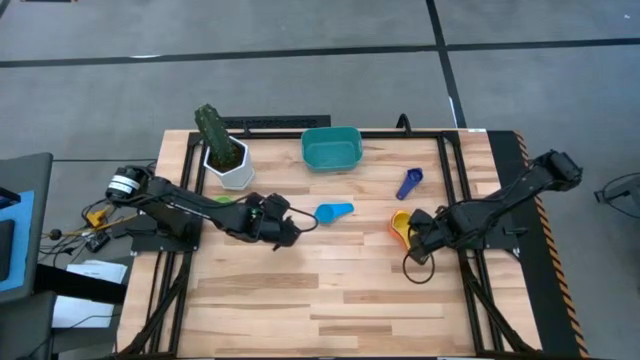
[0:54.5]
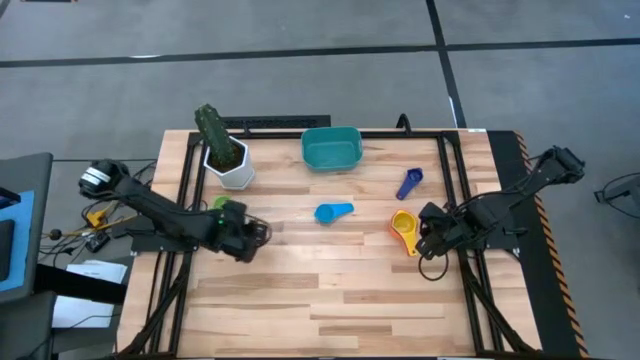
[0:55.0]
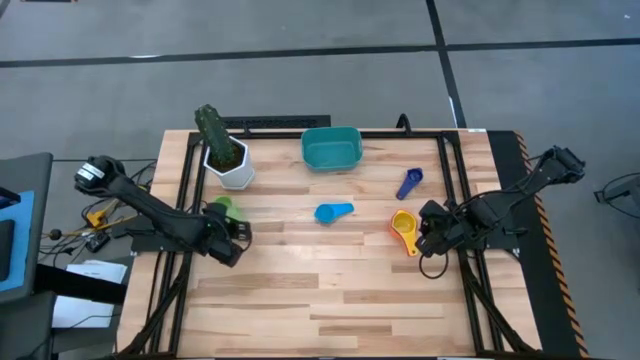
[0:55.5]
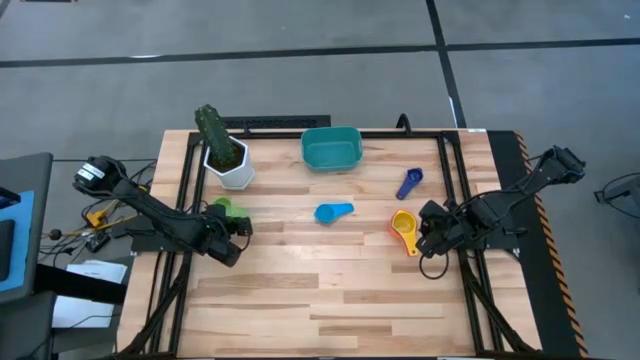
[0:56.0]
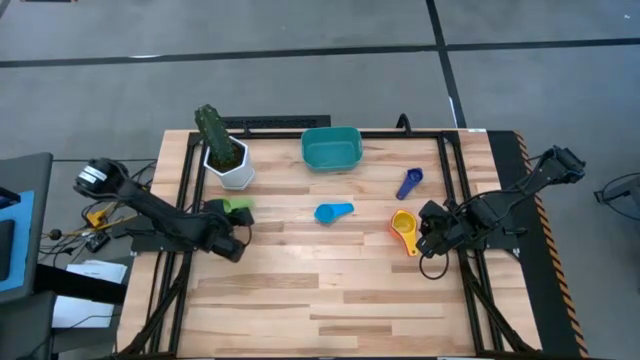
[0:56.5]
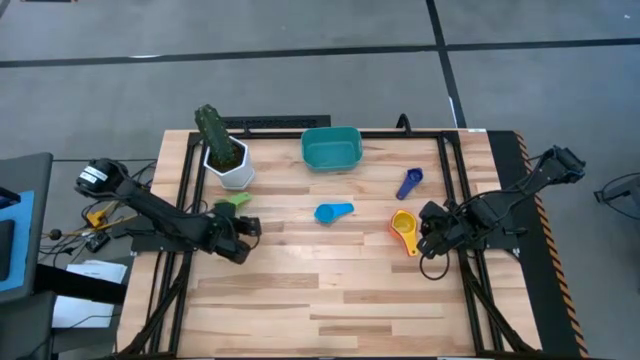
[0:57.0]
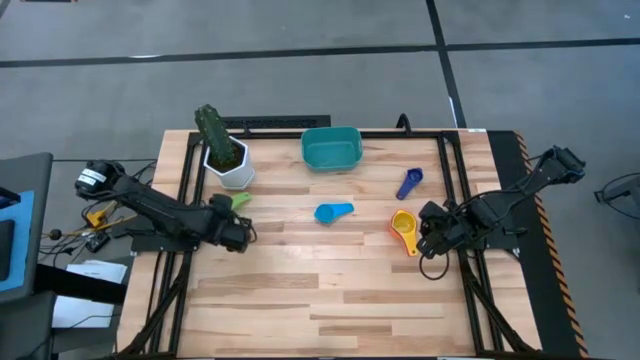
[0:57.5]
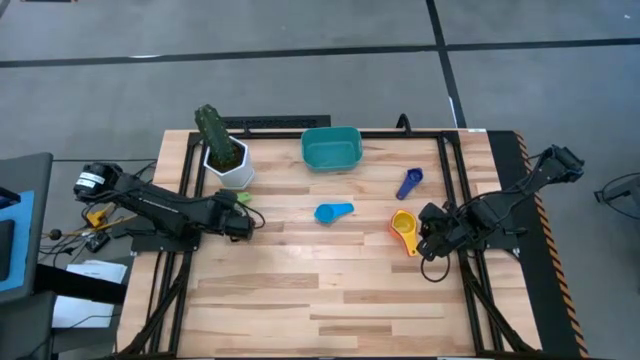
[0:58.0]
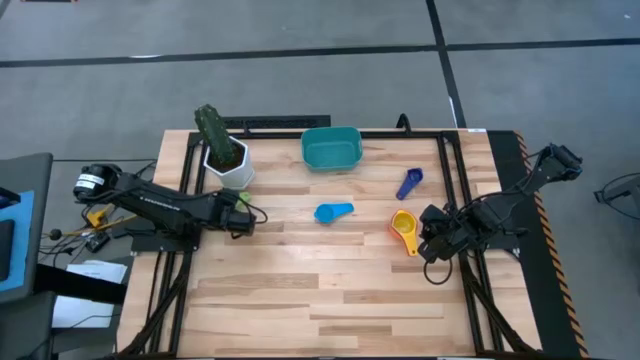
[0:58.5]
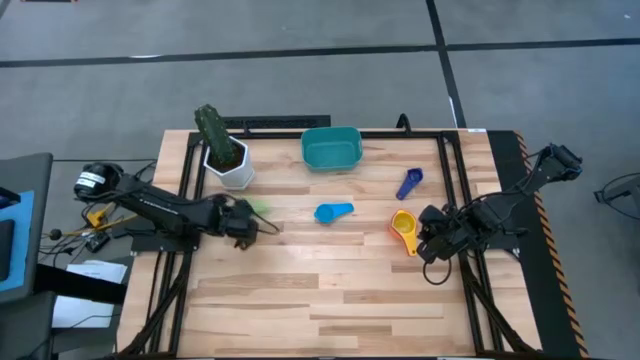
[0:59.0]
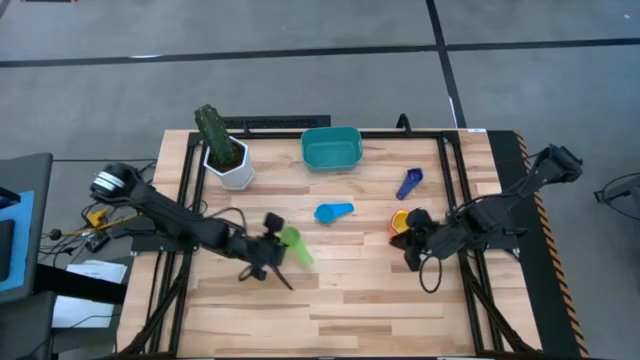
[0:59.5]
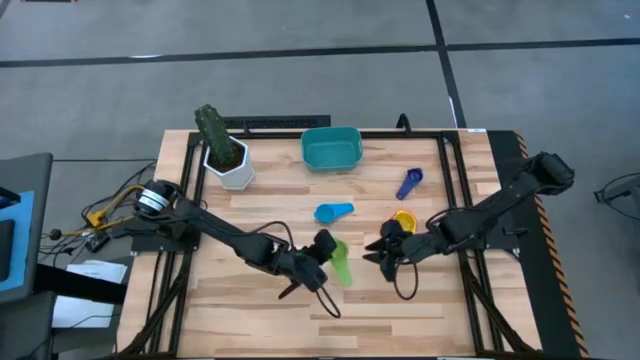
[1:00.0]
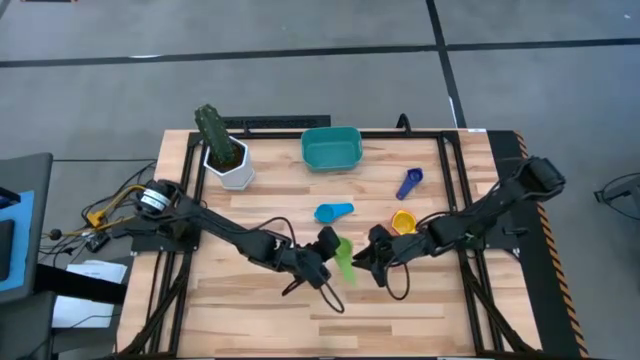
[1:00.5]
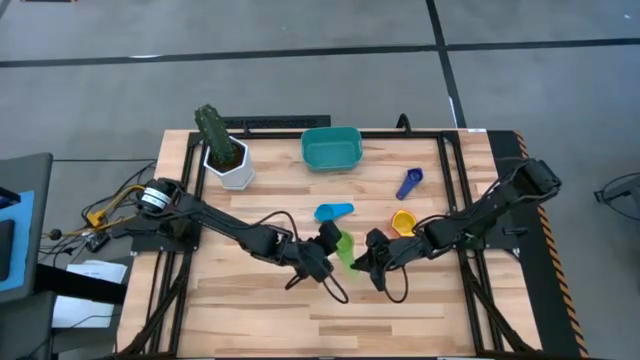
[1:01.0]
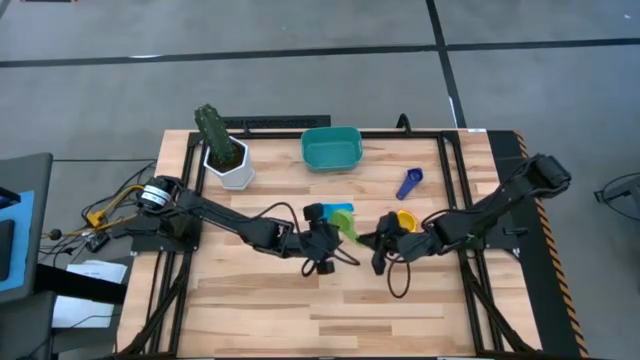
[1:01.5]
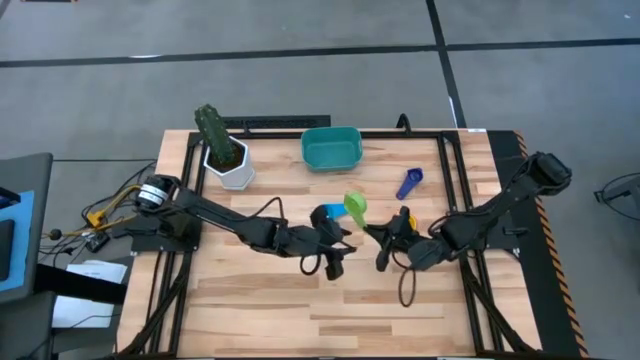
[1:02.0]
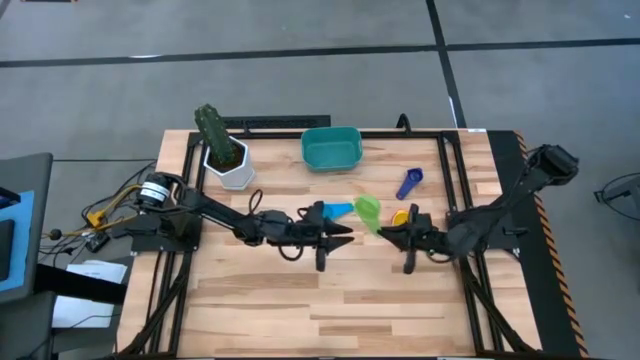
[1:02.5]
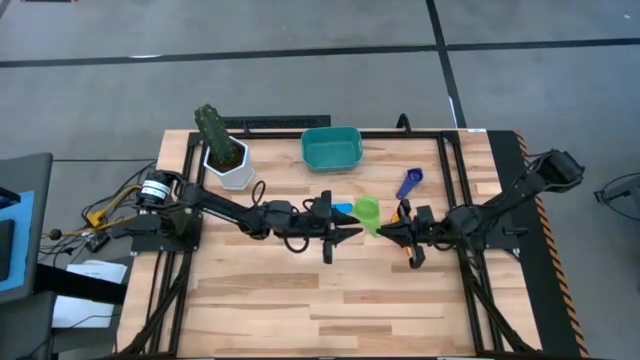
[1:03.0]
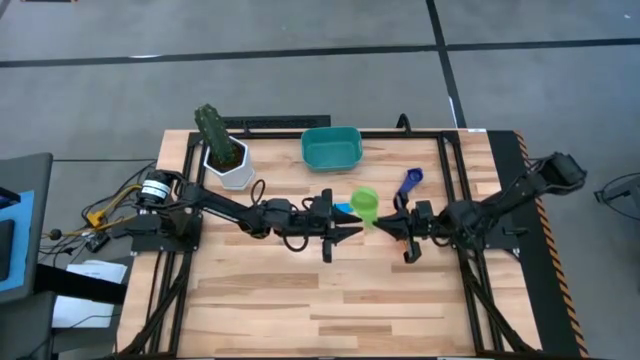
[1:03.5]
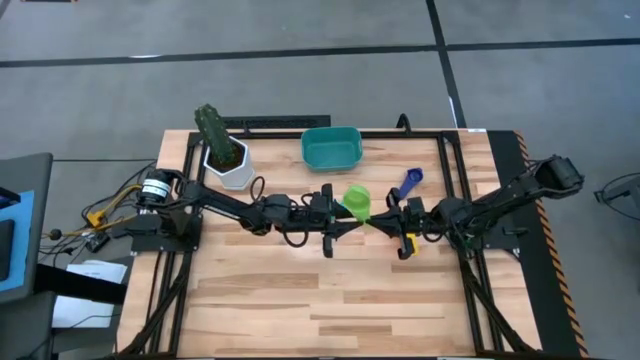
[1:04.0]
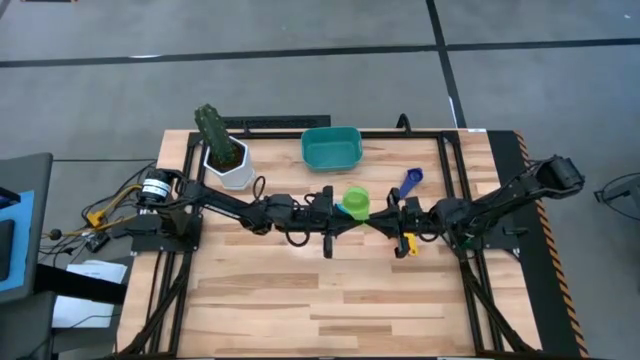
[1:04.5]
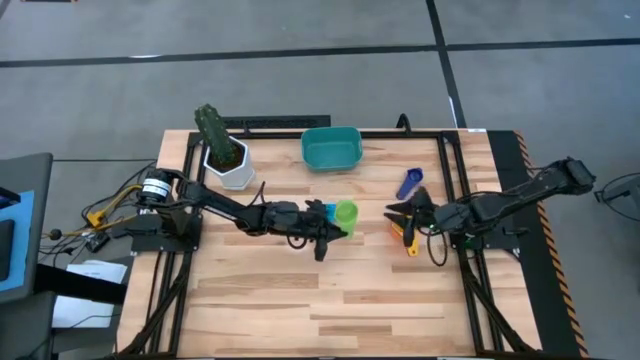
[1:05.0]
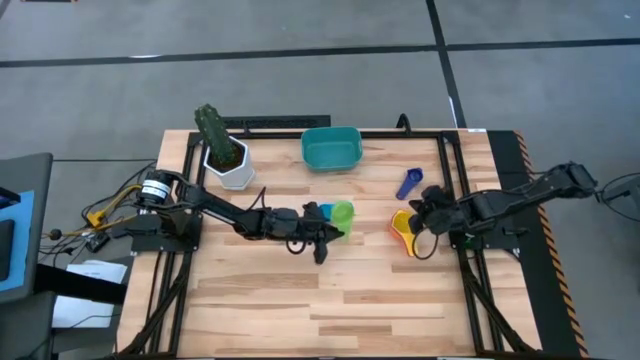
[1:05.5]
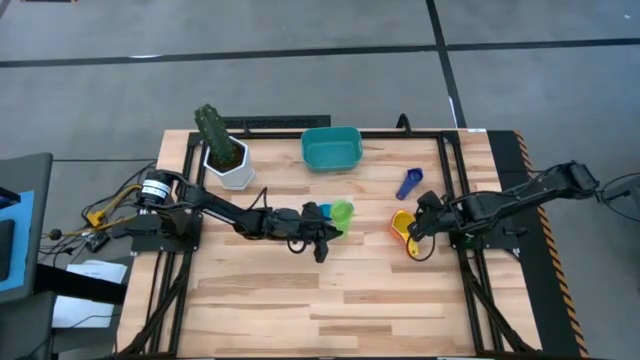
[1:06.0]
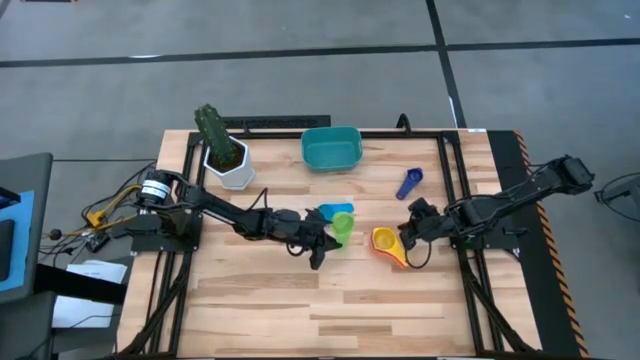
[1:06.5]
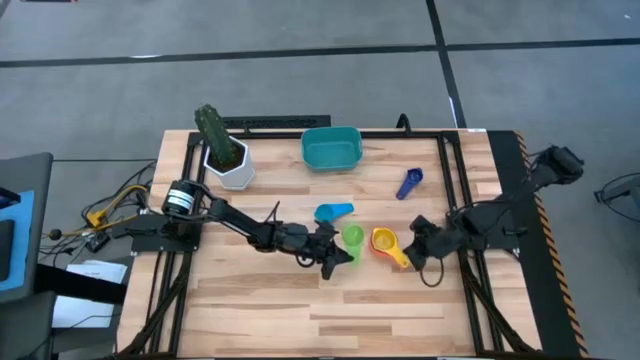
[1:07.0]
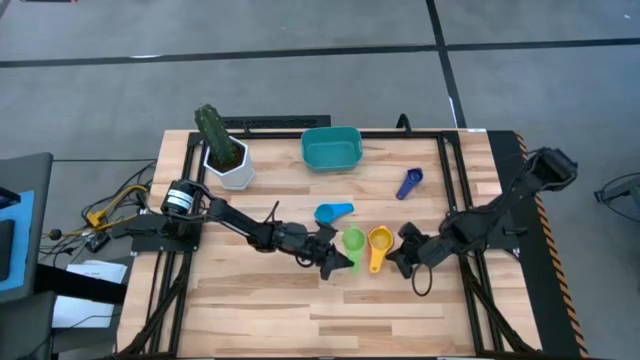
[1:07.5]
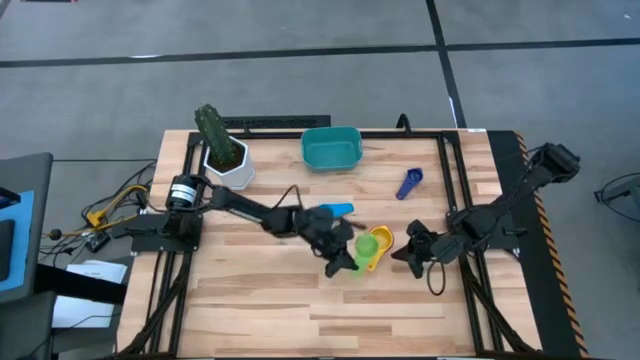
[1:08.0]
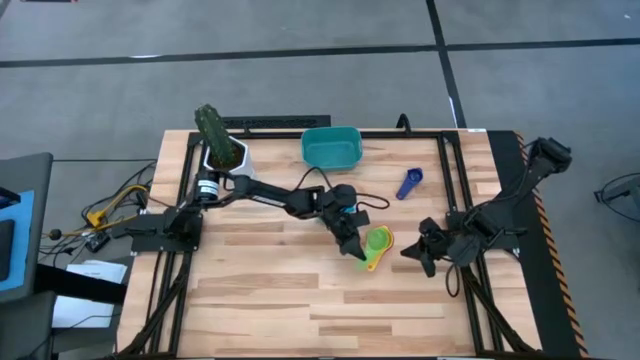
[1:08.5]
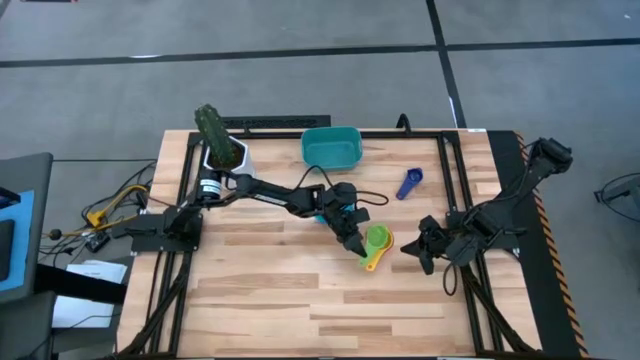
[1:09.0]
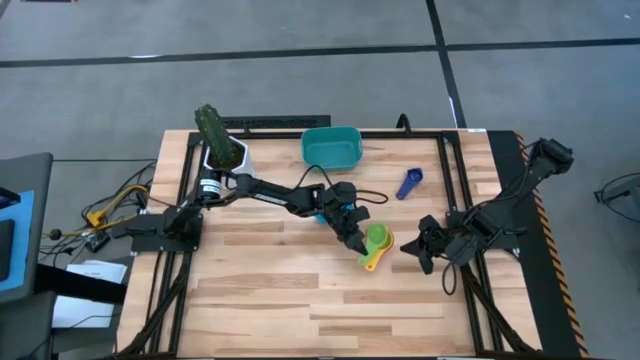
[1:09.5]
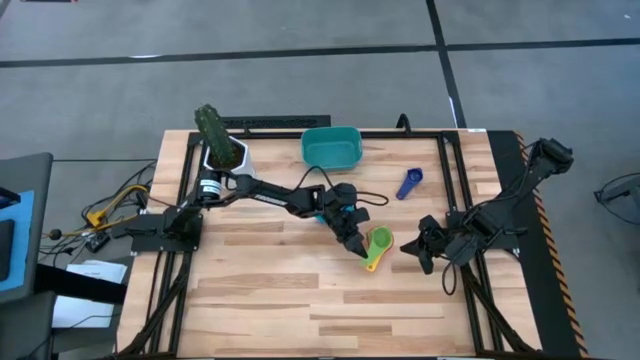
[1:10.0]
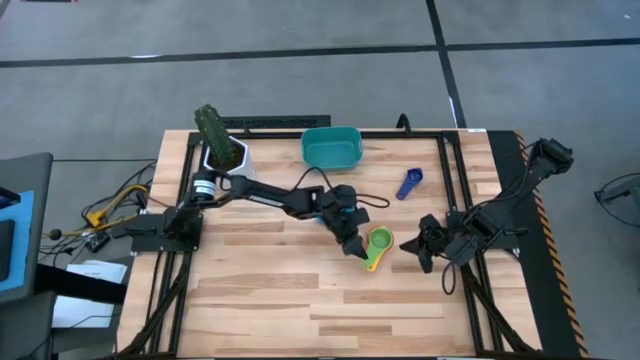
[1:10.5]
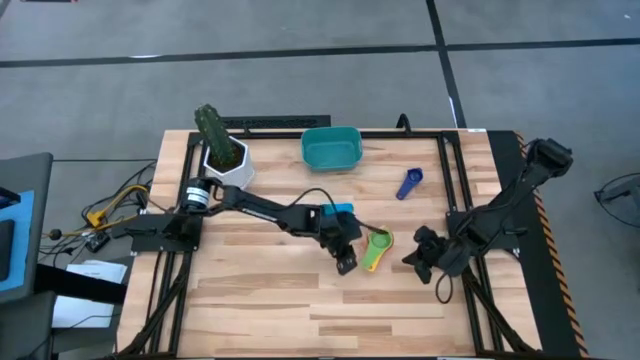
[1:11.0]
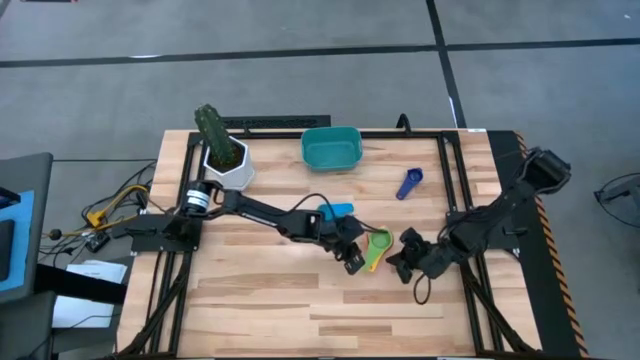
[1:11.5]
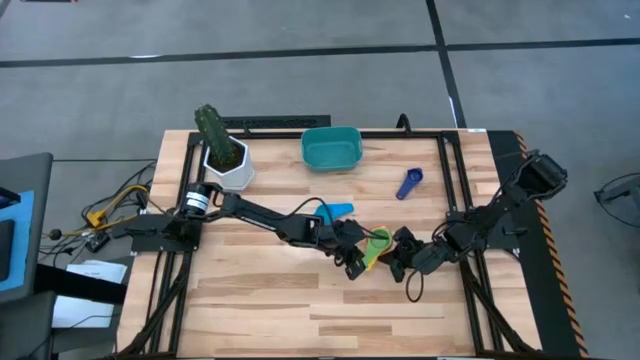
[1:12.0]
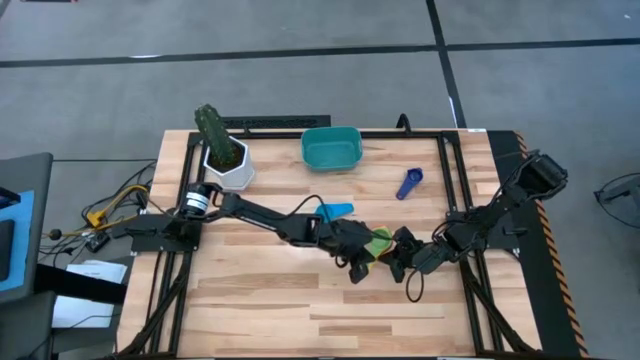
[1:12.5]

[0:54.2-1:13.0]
Task: Nest measuring cups in basket
Stack the green measuring cup into the yellow measuring cup

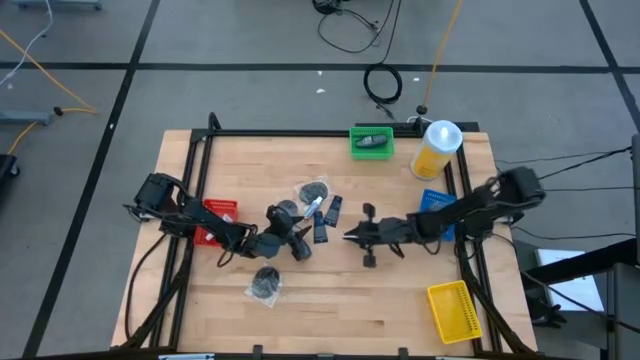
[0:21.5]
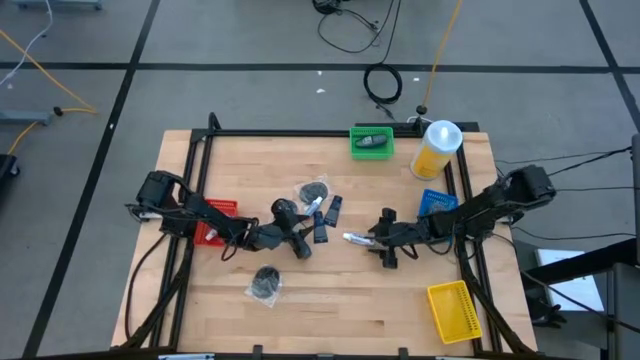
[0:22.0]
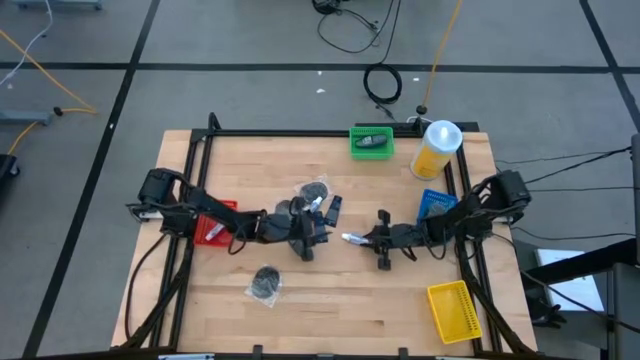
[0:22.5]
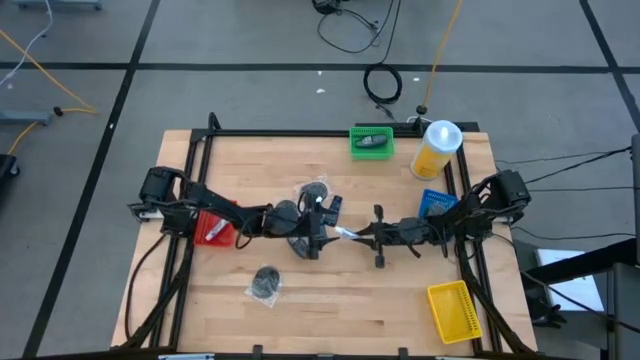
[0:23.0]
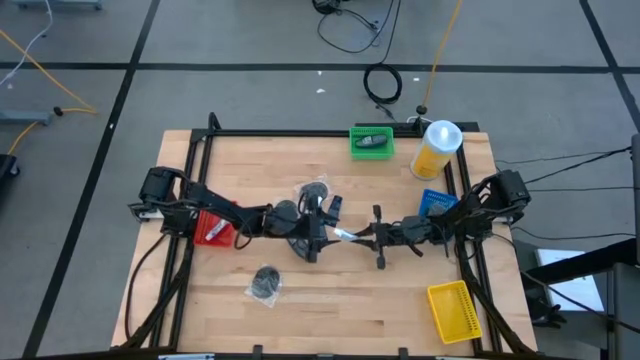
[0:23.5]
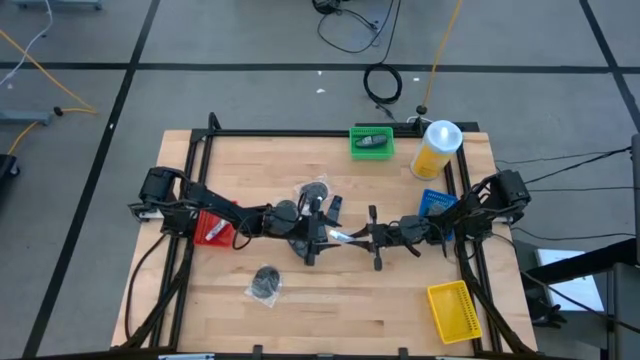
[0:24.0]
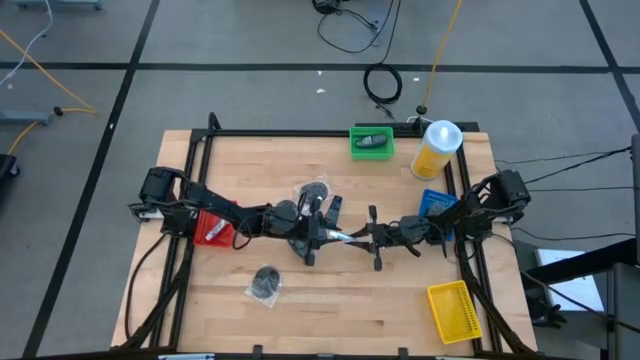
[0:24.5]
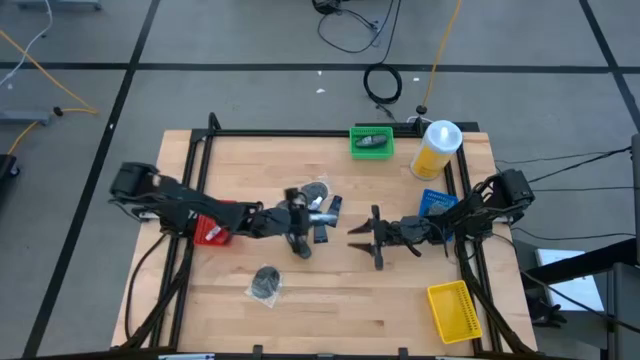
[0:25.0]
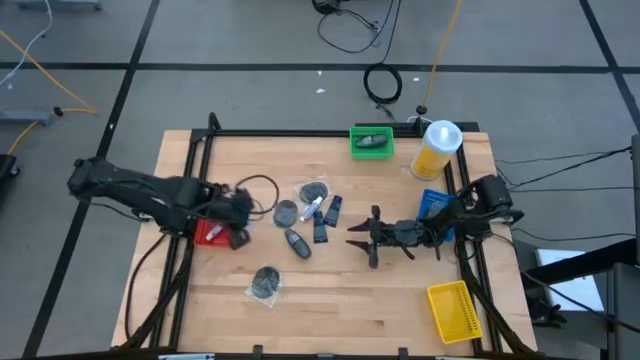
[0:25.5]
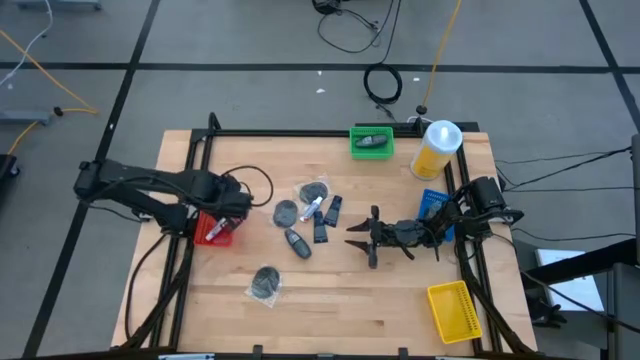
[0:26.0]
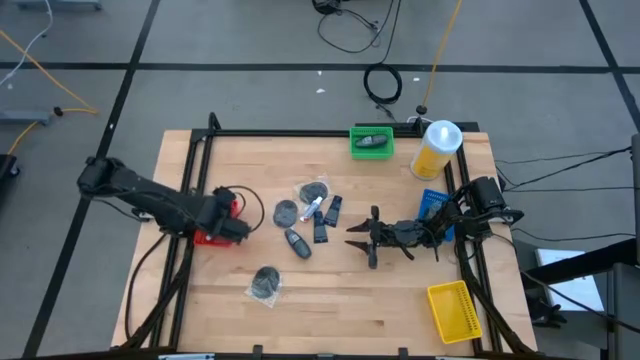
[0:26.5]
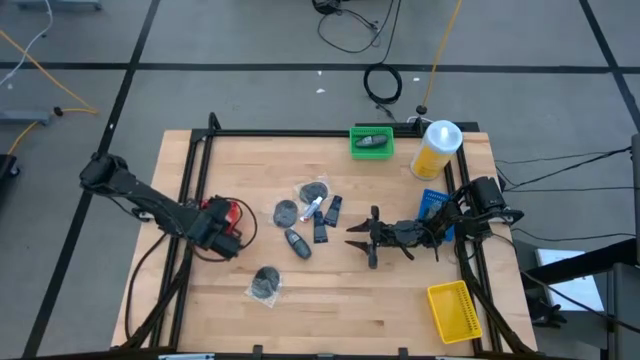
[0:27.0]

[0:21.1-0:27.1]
Task: Pick & Place Travel size toiletries
Put the white toothpaste into the red bin
